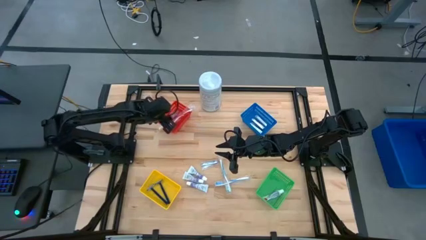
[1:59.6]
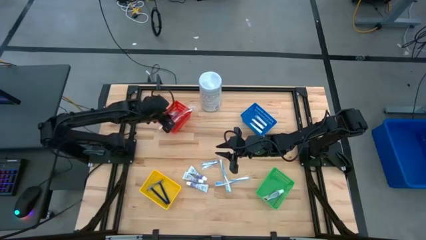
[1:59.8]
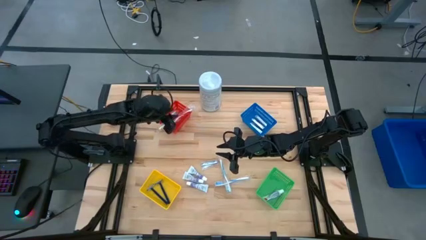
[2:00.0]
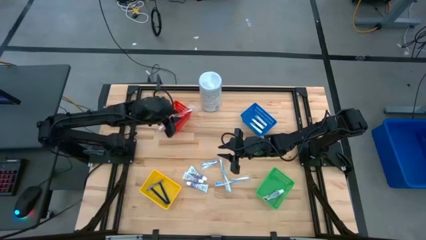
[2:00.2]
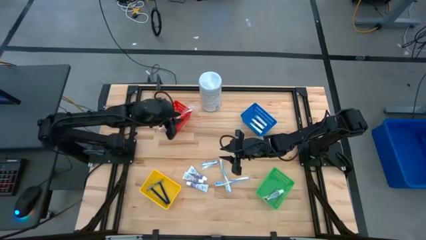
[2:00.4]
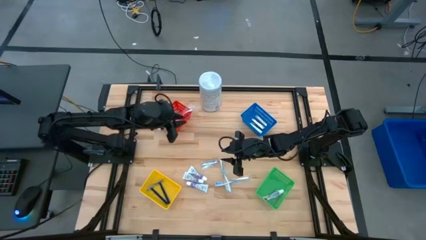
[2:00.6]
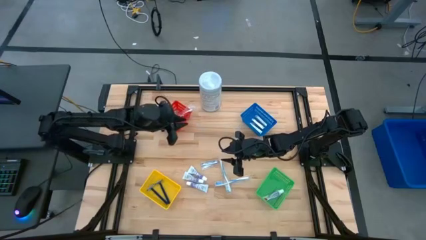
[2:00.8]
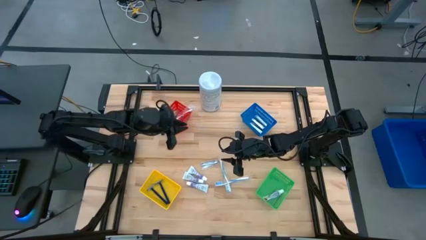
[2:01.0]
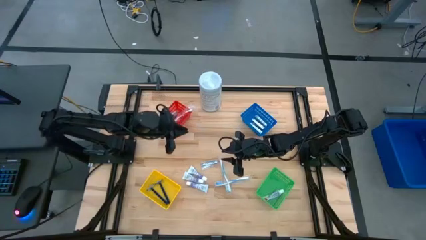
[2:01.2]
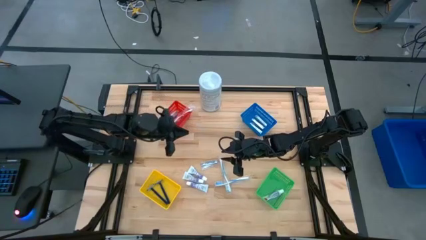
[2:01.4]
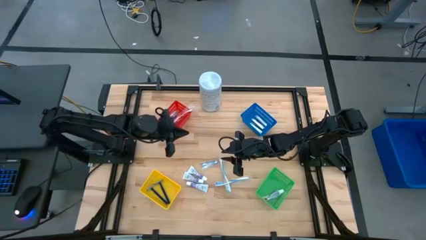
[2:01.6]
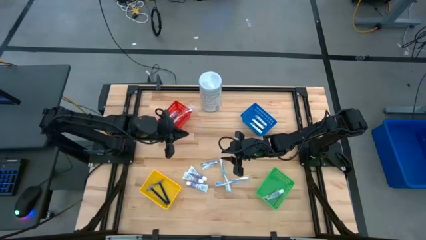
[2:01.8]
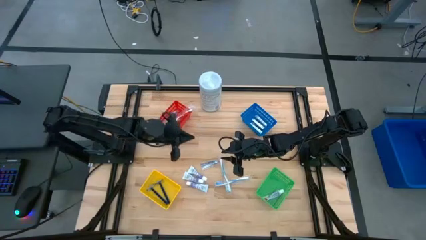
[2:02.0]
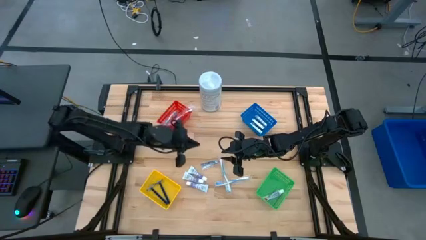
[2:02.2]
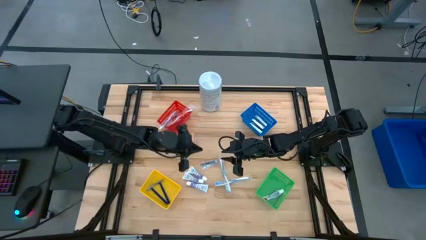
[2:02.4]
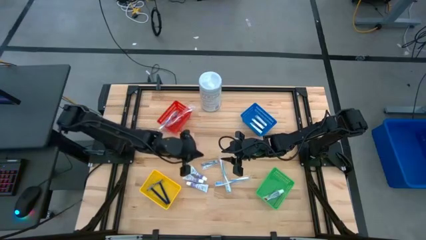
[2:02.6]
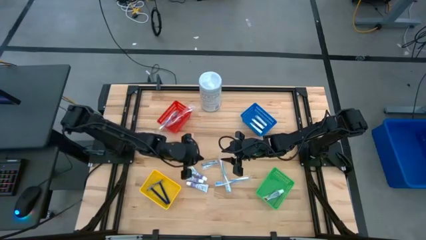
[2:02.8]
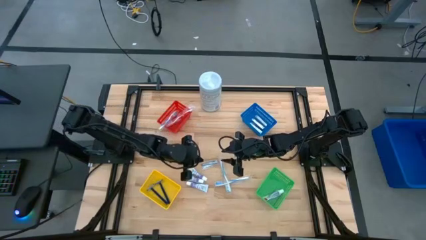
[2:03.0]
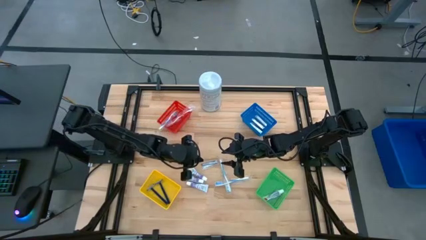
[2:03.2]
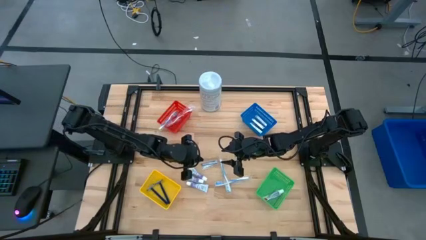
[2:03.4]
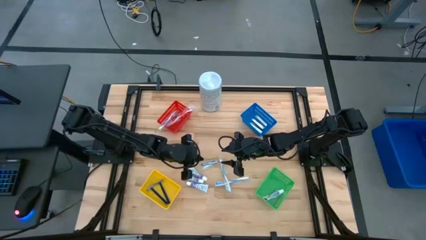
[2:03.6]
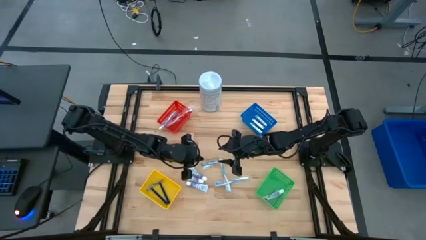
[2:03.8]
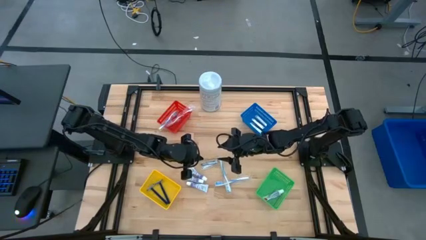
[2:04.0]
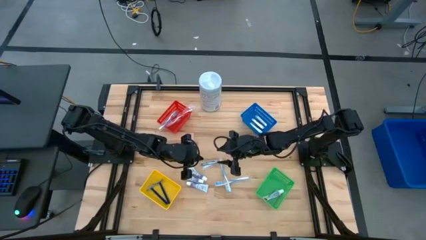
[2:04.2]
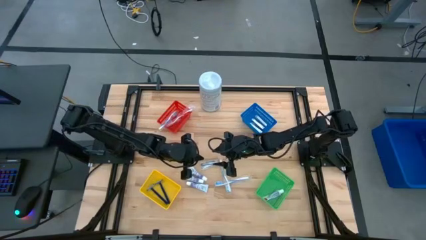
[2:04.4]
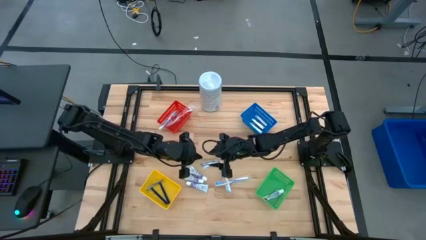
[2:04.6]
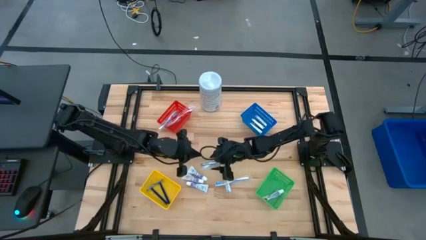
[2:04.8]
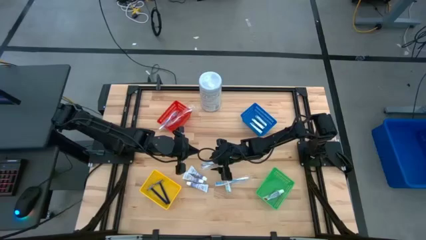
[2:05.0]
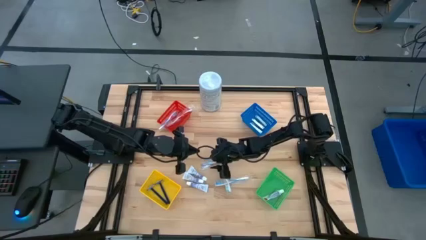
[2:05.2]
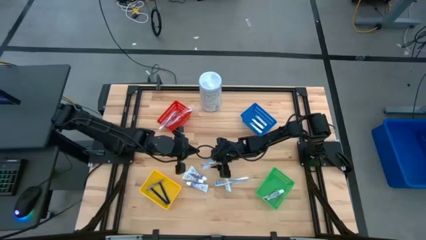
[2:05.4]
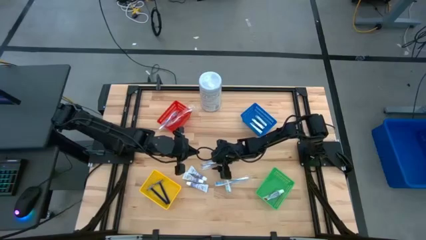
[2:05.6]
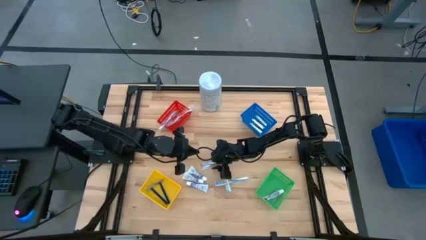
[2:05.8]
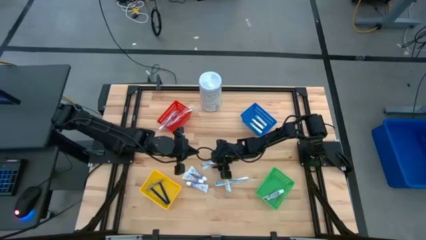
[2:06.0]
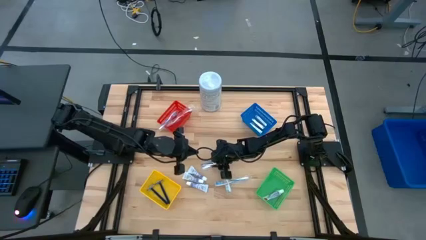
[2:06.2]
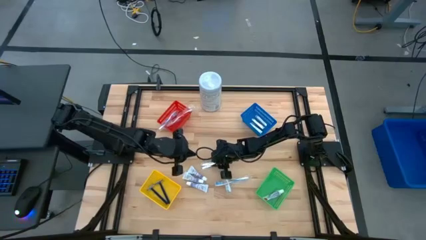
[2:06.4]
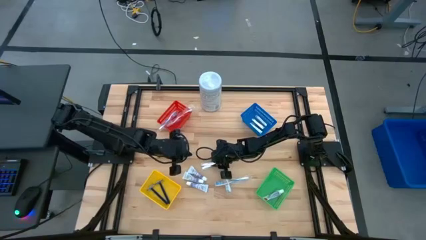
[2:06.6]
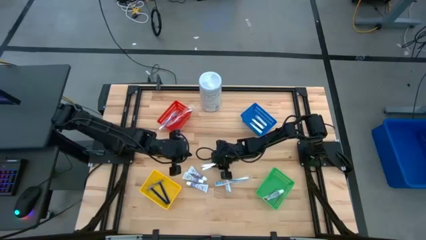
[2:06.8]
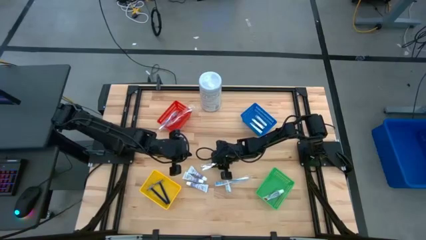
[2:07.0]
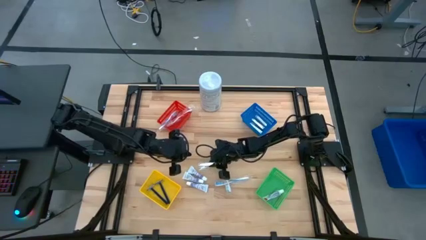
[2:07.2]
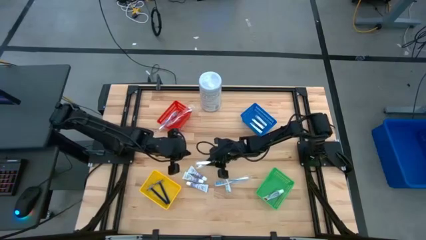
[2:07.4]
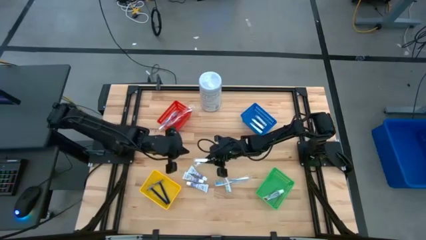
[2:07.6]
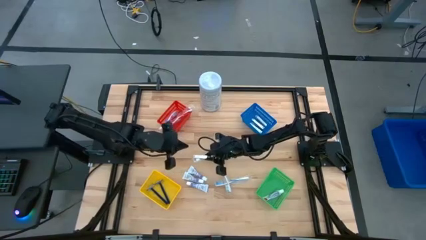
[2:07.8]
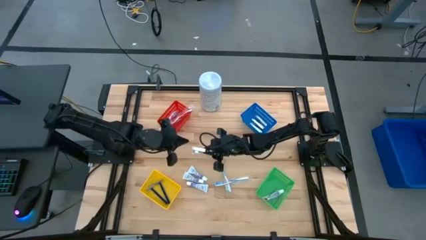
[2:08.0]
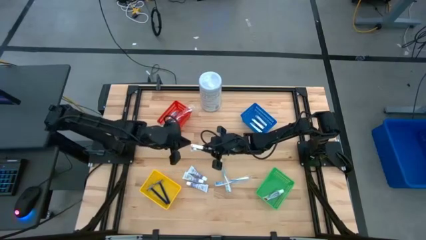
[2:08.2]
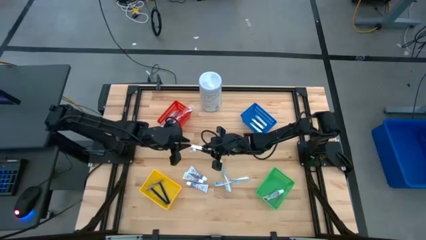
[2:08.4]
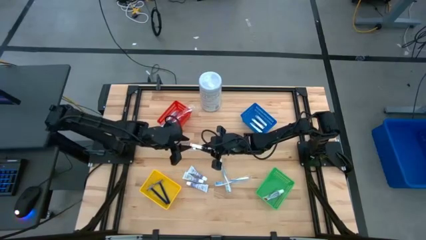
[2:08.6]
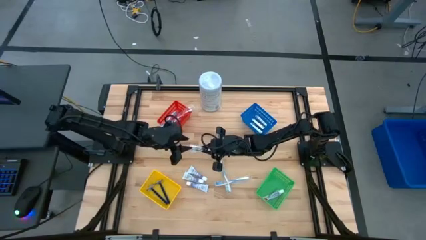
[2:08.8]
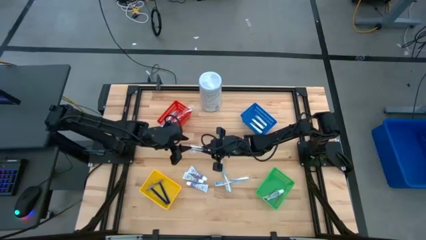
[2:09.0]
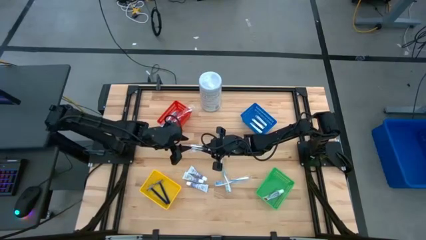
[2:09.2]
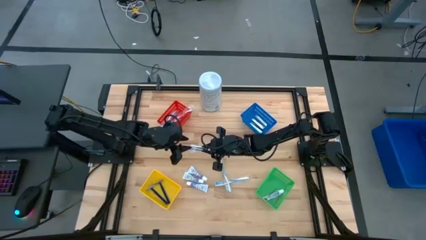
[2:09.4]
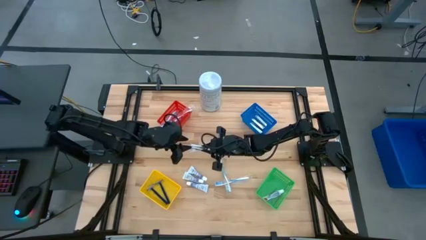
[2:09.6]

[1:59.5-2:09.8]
Task: Pick & Place Travel size toiletries
Put the silver nail clipper into the blue basket

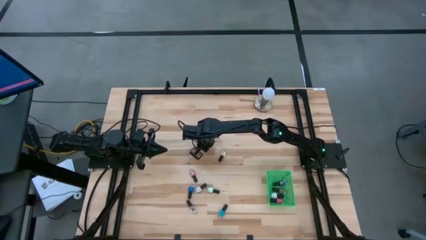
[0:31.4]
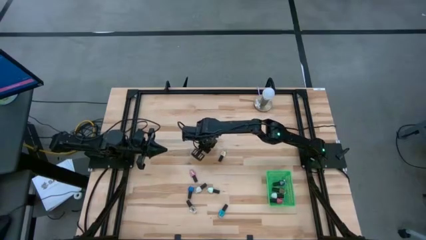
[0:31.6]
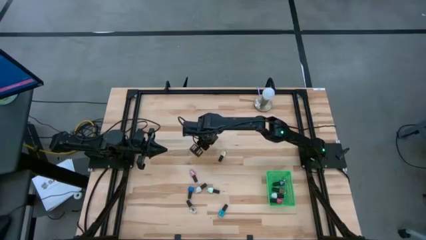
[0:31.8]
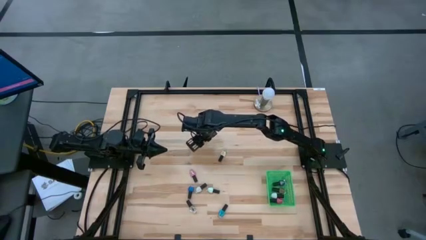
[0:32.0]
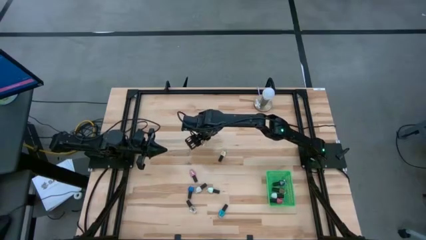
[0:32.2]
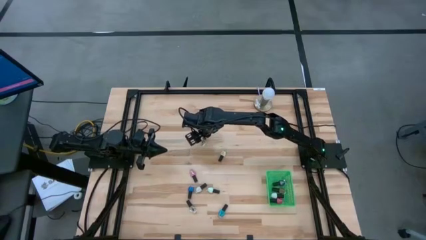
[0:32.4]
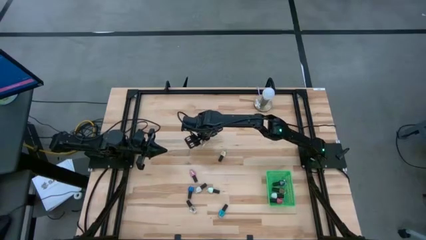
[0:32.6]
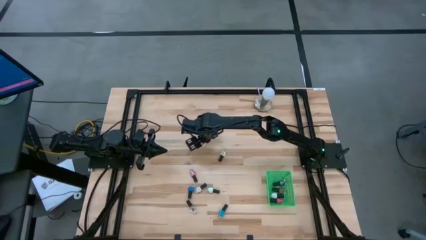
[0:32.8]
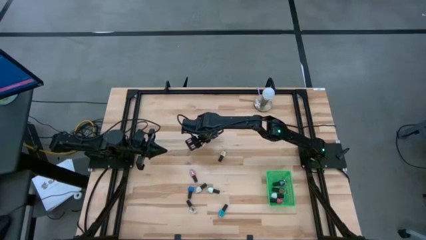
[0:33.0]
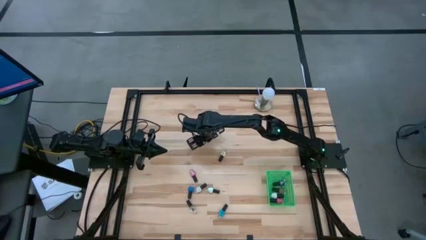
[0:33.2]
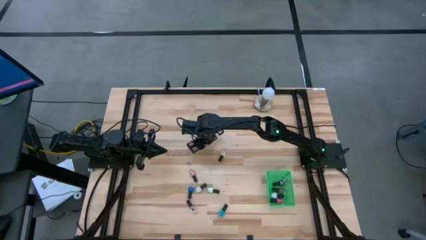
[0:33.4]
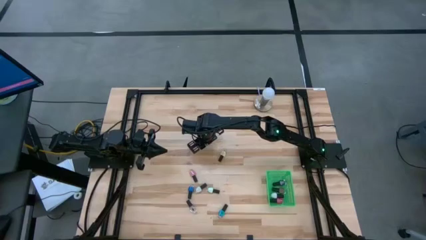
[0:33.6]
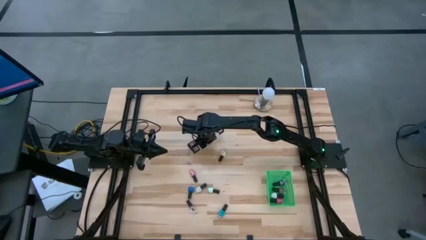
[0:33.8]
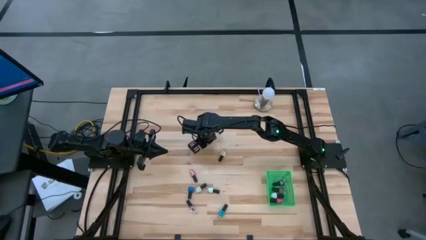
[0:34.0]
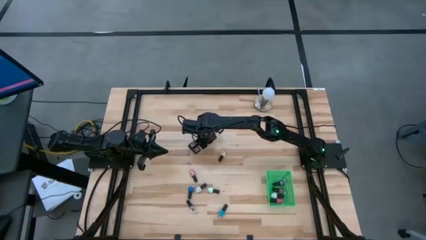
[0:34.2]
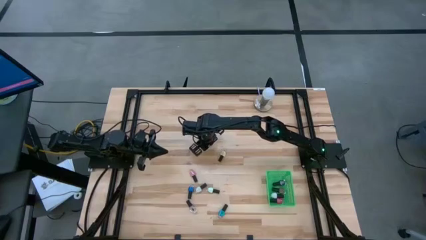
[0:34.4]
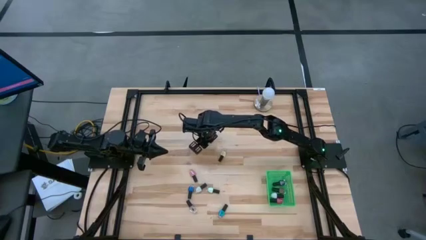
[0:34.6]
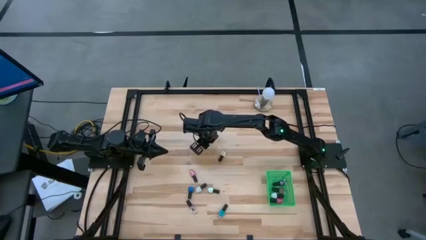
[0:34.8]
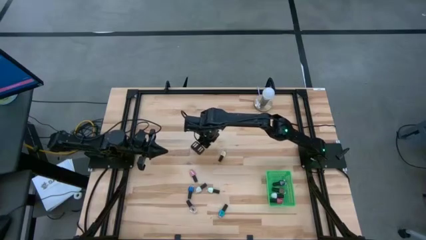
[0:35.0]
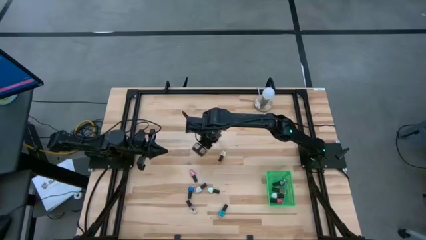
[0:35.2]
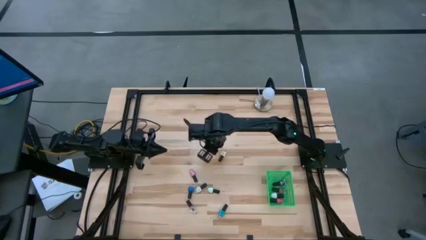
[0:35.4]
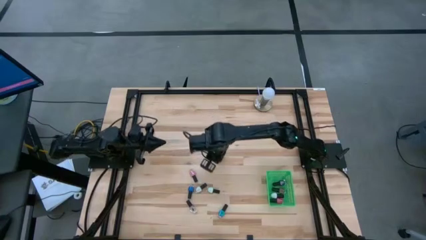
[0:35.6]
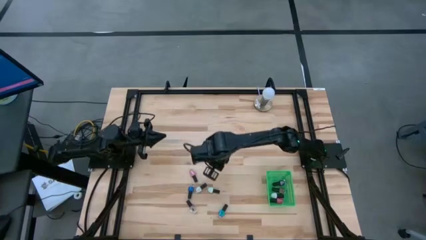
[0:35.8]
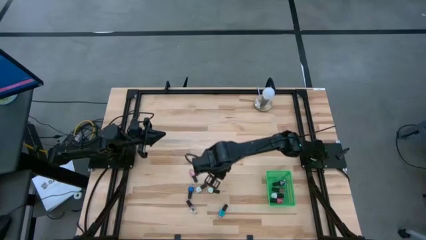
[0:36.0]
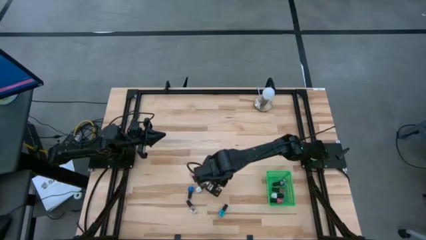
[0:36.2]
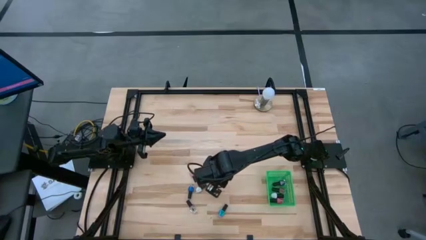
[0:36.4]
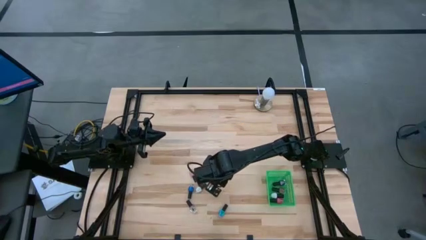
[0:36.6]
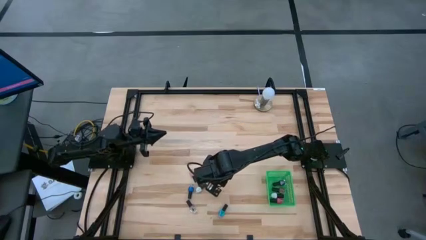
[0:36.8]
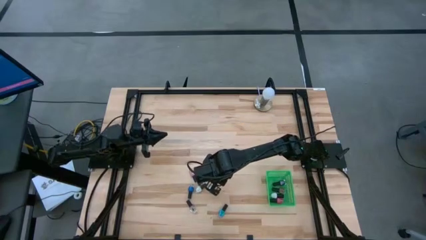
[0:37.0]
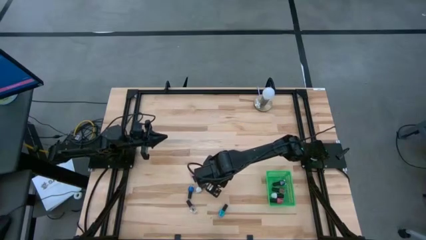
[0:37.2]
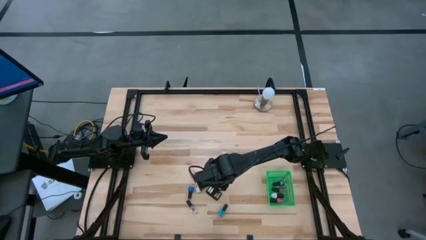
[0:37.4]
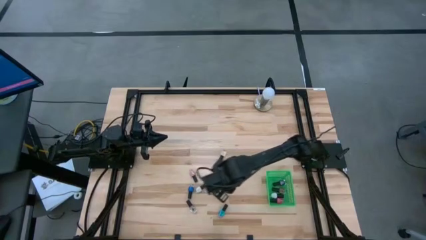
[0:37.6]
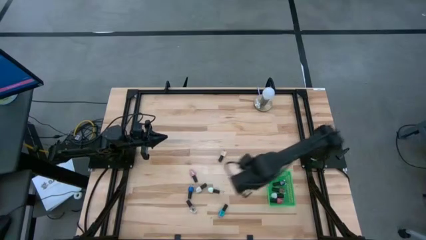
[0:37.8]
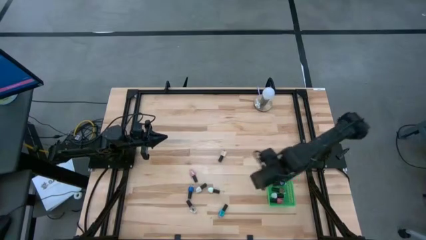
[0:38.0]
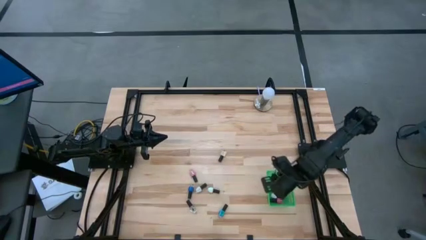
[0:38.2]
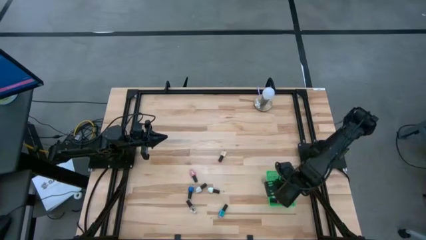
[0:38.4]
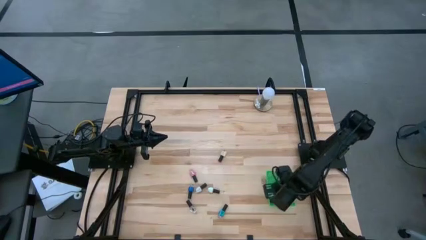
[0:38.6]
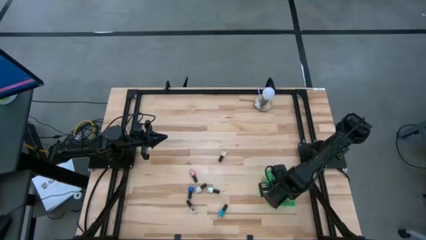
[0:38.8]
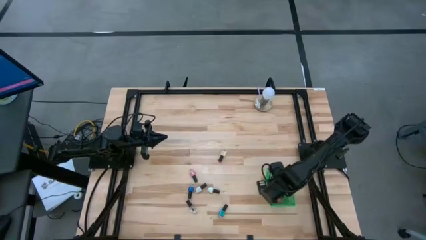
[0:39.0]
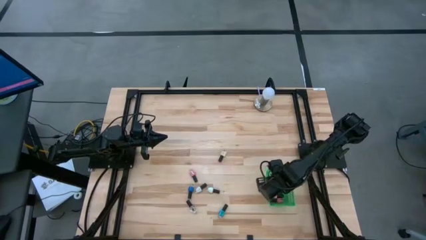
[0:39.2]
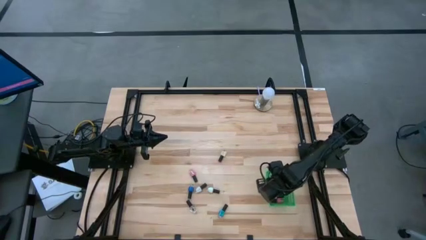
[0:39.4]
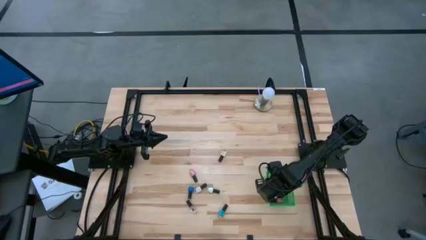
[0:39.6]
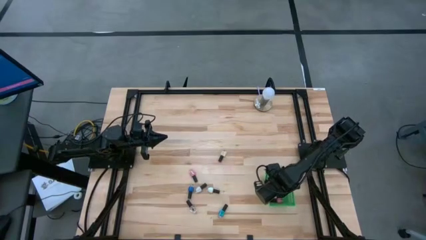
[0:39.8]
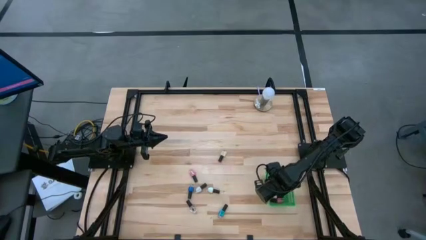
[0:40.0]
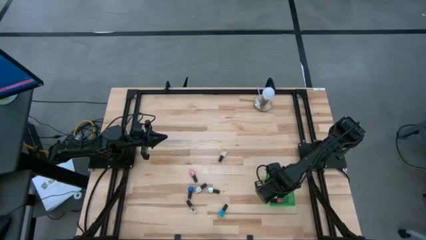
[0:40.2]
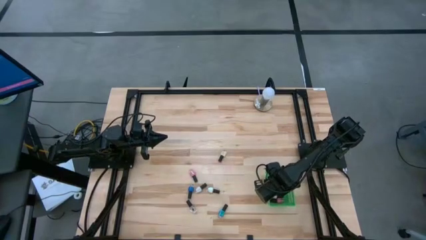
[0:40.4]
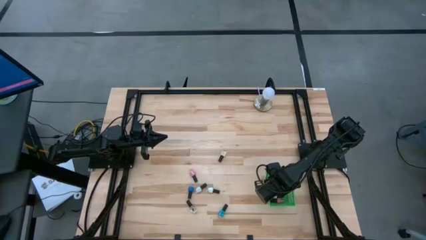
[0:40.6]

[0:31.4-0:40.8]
Task: Pick & Place Nail Polish
Put the top transparent nail polish into the green bin
